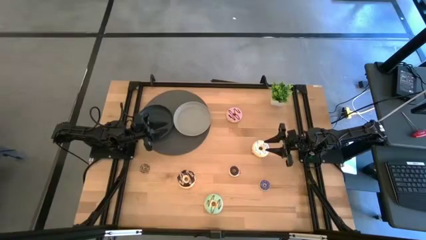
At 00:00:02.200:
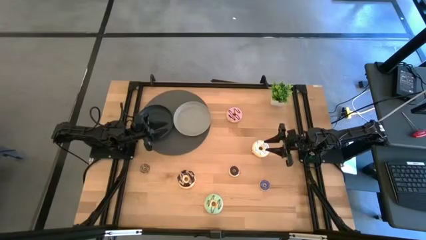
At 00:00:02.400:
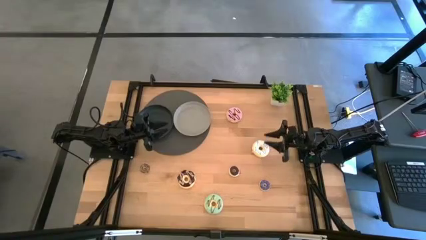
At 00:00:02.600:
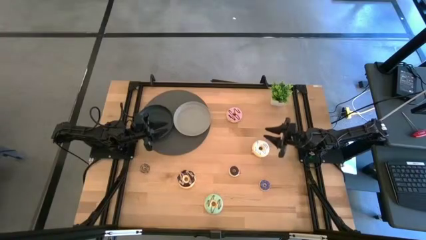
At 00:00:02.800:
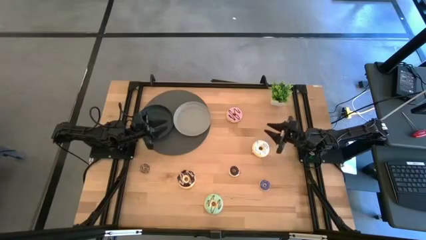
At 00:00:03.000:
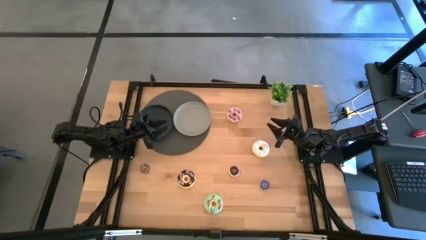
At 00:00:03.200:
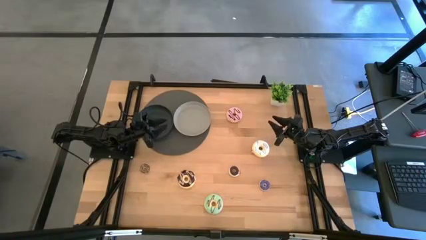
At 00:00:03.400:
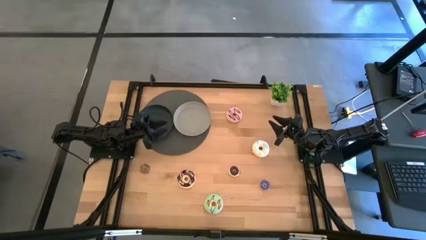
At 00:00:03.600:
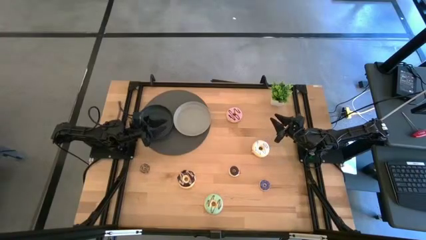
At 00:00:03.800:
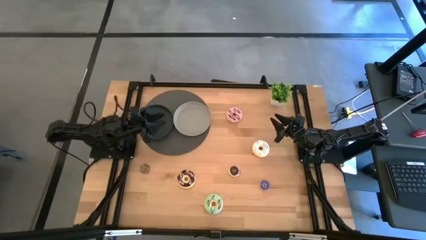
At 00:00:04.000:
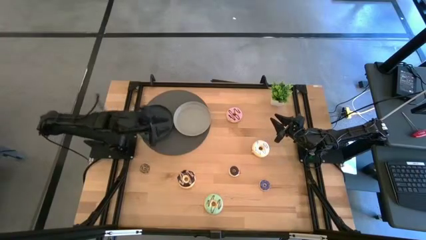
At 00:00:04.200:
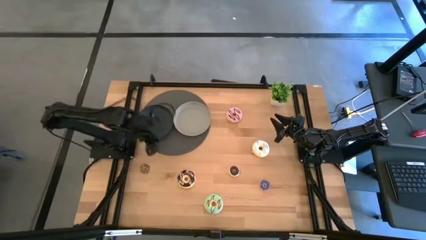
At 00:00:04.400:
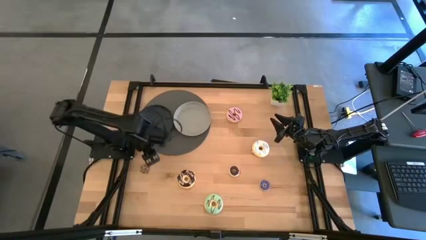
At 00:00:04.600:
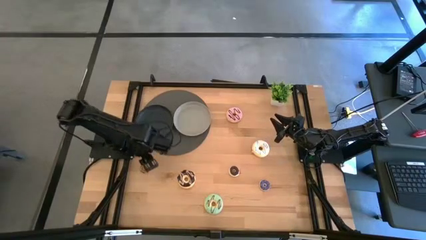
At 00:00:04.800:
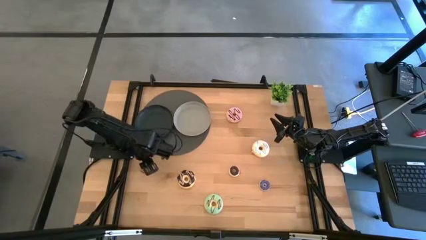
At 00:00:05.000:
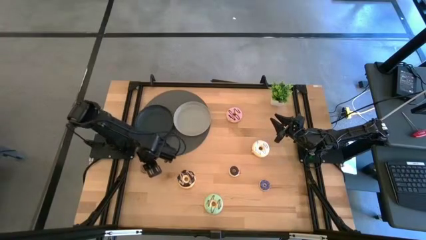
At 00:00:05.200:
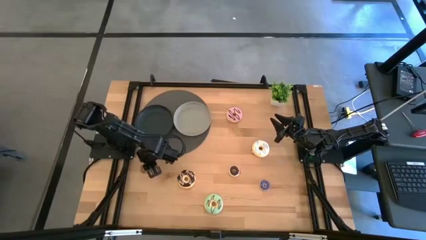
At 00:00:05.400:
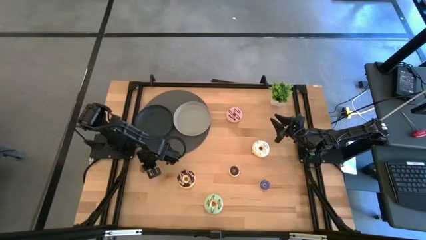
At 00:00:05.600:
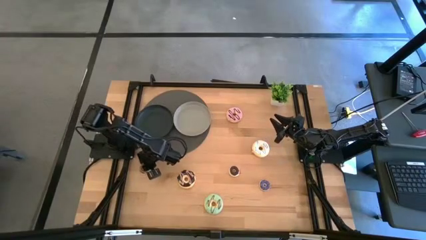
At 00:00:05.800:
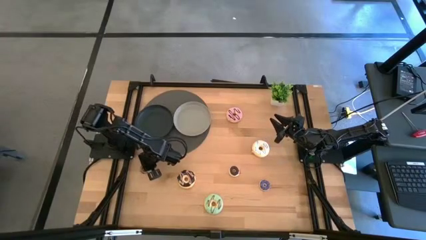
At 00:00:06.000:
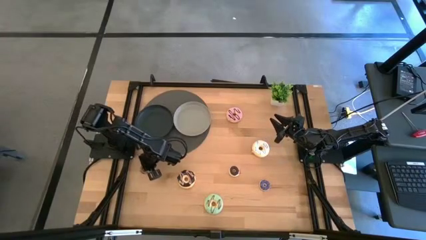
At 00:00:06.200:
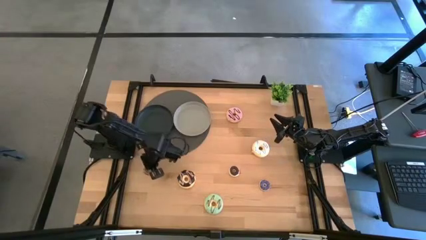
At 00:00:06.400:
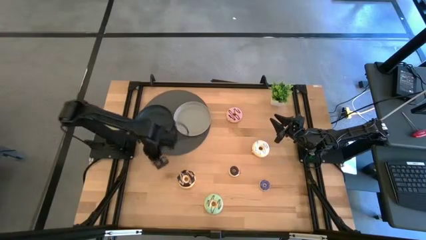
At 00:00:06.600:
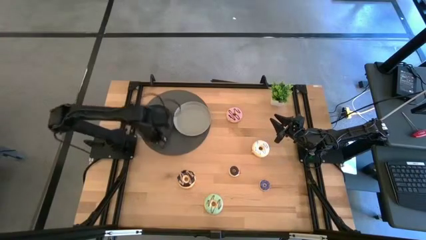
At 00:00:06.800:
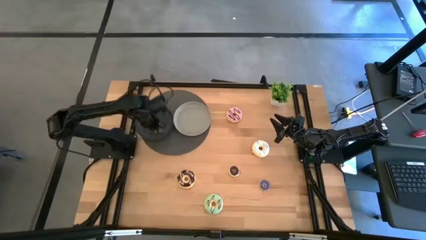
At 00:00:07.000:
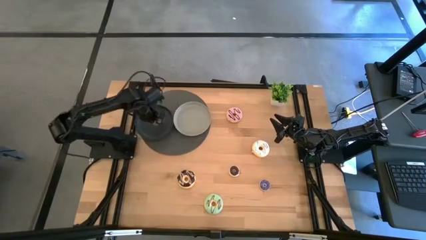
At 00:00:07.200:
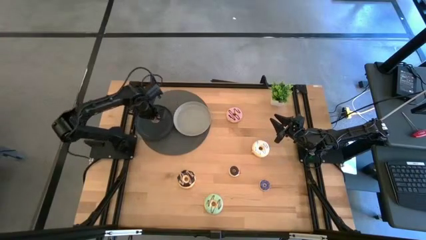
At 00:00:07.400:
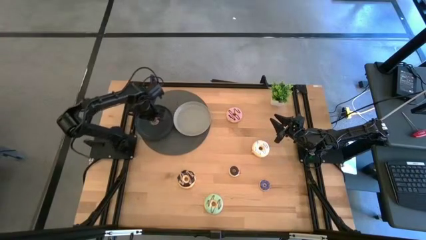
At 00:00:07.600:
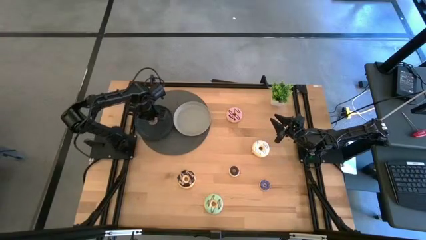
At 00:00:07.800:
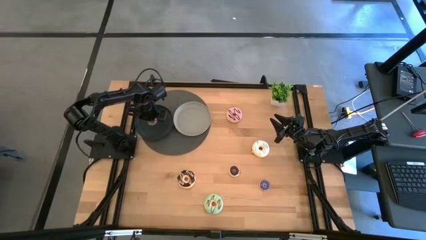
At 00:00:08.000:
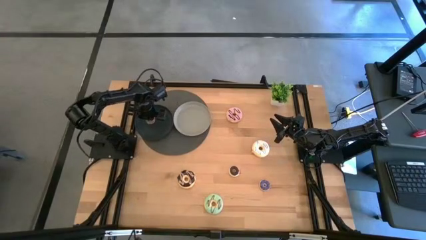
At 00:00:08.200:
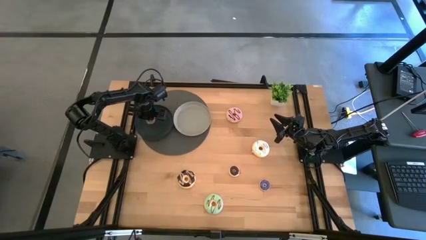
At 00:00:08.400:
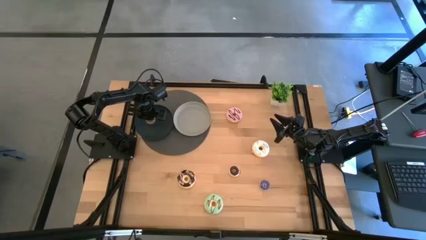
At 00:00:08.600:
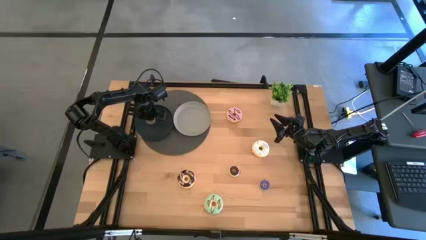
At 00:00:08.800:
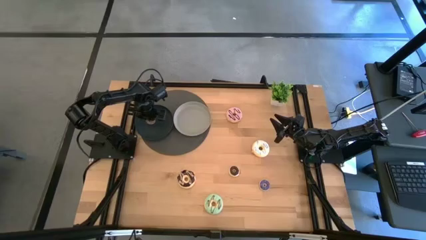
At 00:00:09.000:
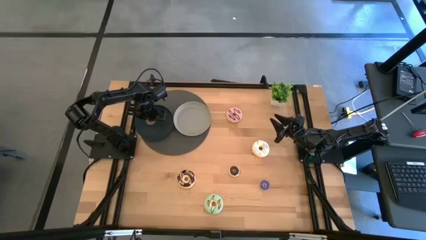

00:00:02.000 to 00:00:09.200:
Task: Pick & Place donuts
Put the small brown donut on the black plate

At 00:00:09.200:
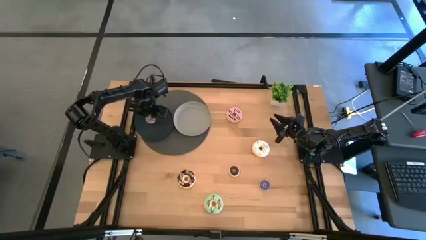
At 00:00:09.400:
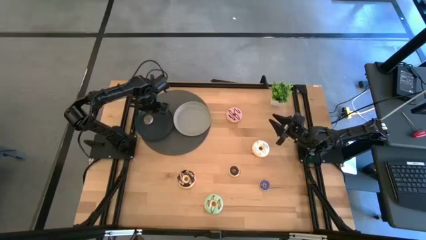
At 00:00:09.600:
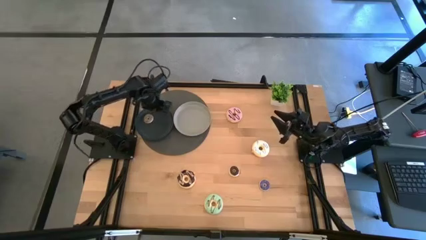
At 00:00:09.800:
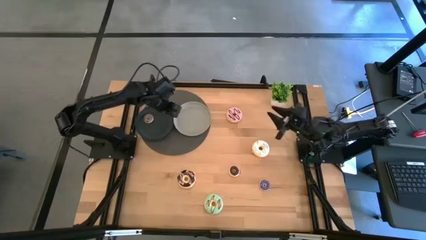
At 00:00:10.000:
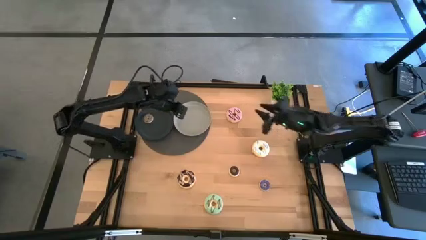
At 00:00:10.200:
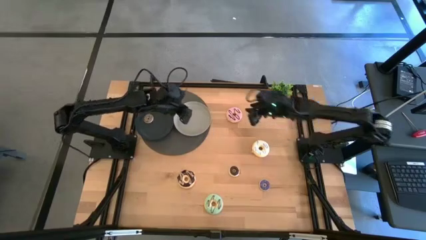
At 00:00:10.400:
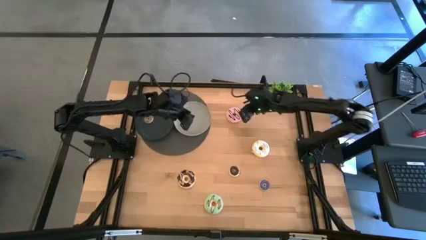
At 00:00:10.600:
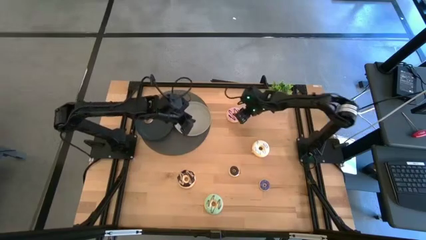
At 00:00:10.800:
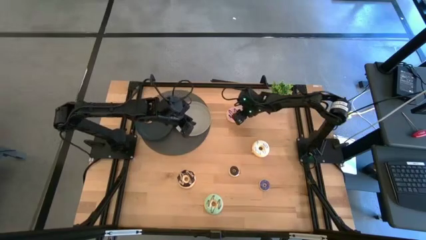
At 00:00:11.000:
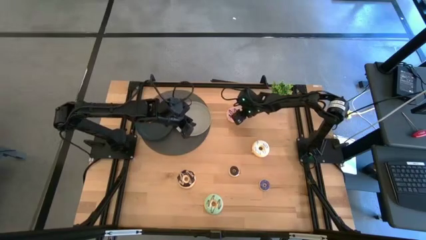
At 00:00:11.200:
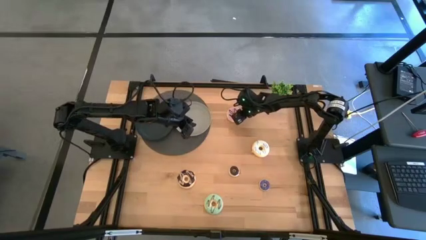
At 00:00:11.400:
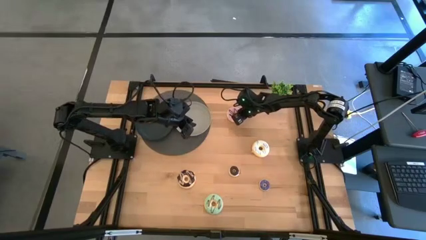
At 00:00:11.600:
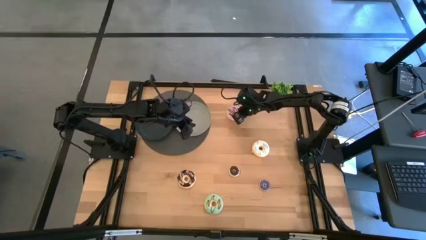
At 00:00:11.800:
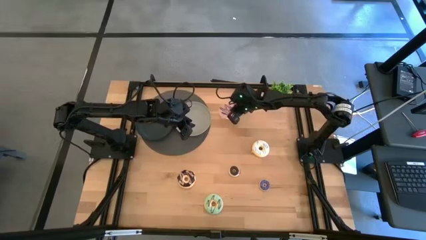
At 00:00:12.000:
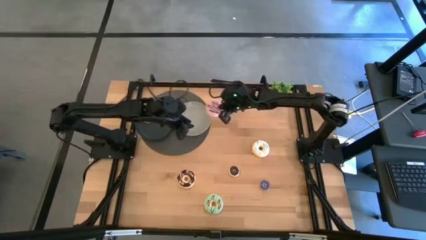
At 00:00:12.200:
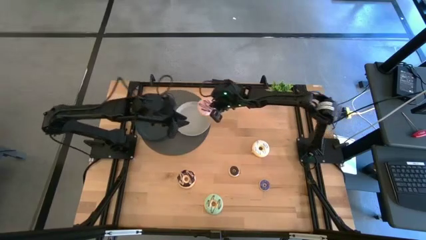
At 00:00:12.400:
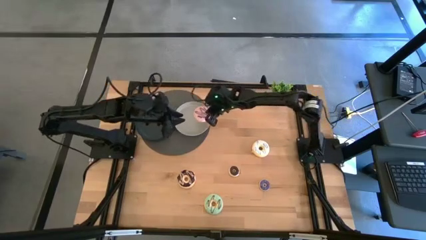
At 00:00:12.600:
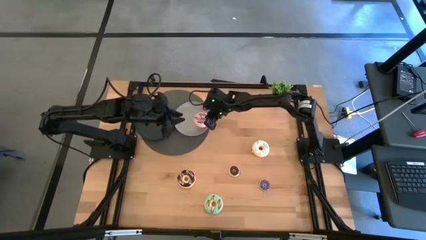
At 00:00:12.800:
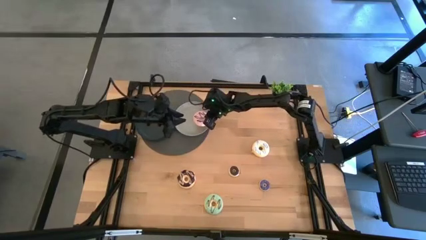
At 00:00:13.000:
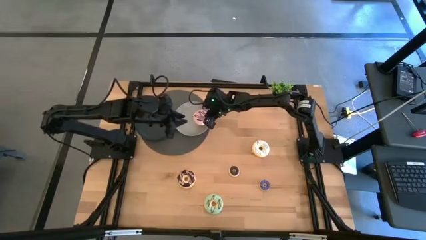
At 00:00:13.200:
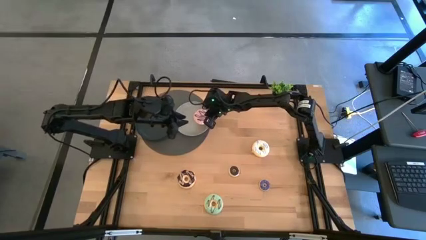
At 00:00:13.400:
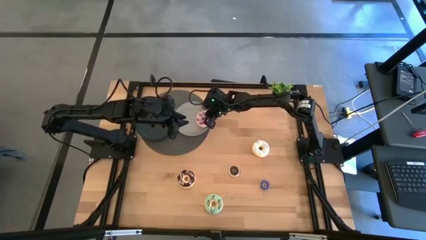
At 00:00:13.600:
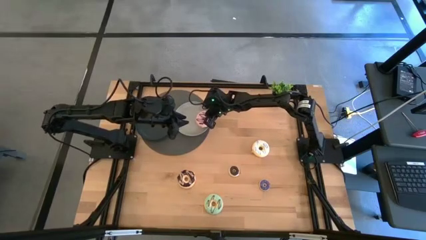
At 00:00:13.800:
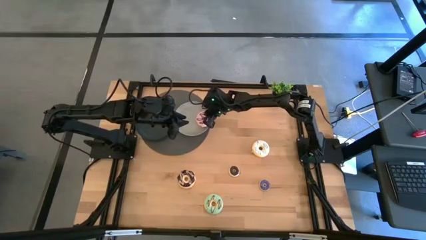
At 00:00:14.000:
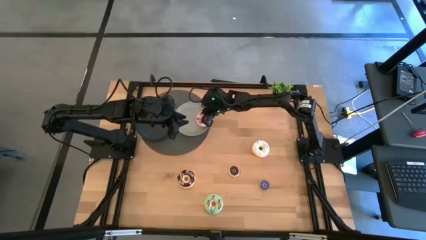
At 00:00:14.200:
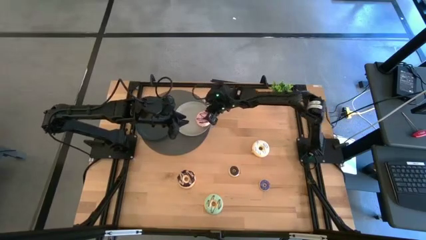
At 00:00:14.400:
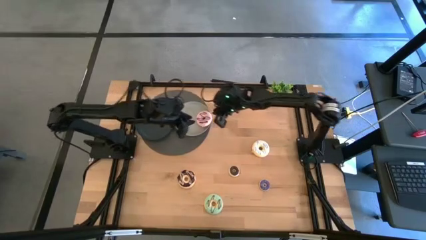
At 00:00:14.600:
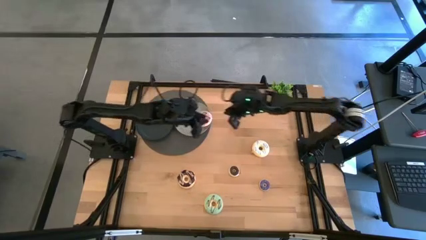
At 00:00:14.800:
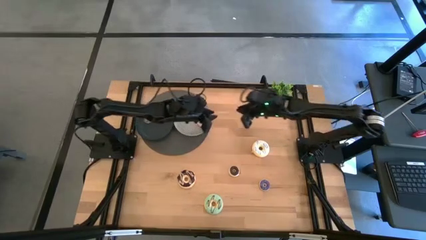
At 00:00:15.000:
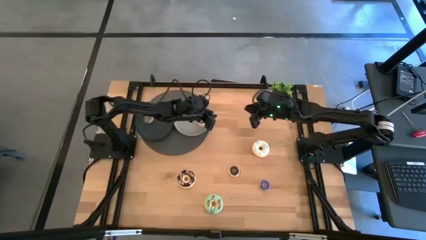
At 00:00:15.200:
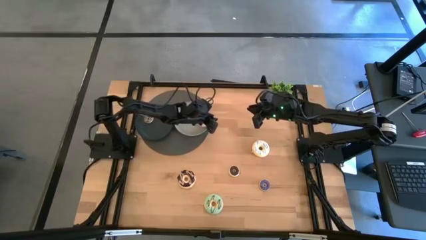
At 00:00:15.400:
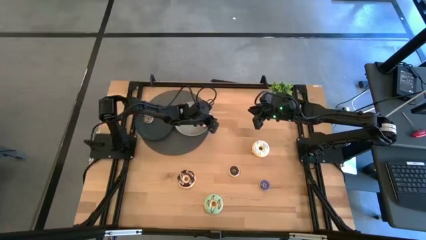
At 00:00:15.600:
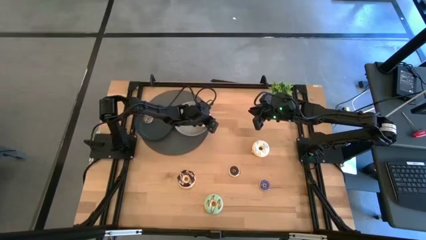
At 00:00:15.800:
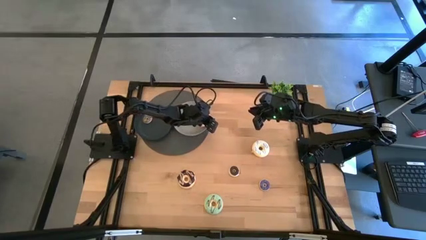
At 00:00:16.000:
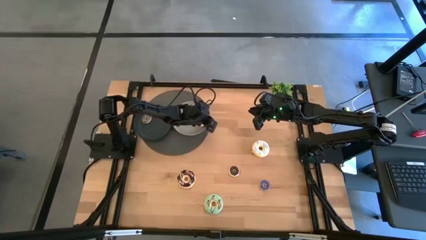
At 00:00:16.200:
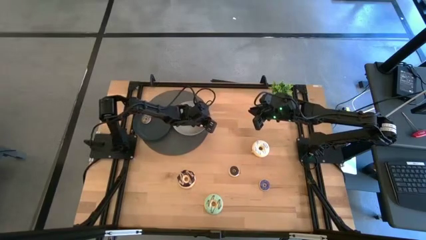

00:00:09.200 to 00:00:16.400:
Put the big purple donut on the gray plate

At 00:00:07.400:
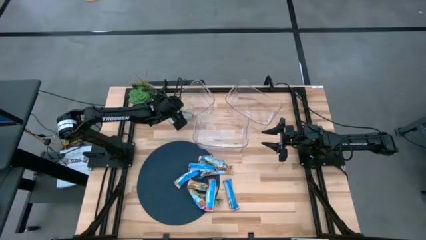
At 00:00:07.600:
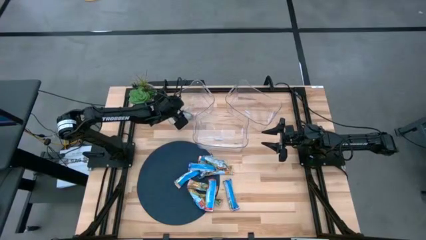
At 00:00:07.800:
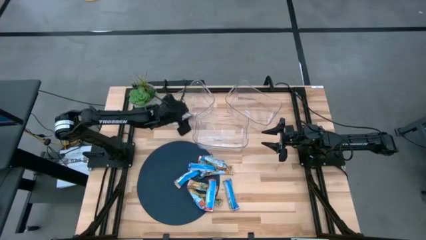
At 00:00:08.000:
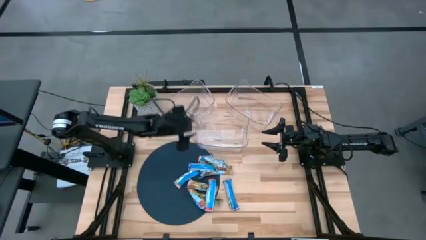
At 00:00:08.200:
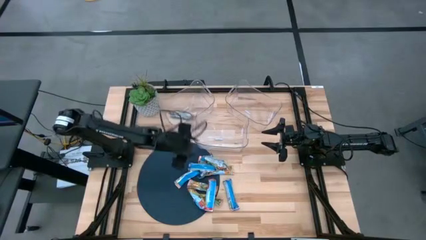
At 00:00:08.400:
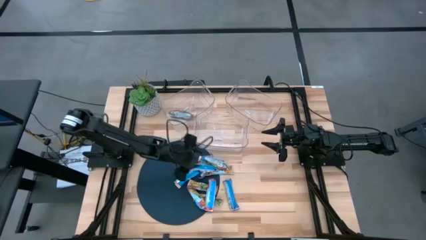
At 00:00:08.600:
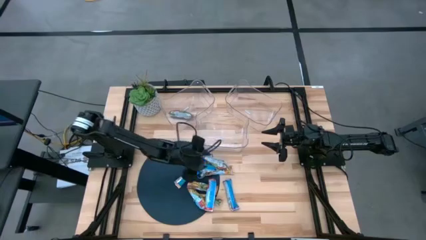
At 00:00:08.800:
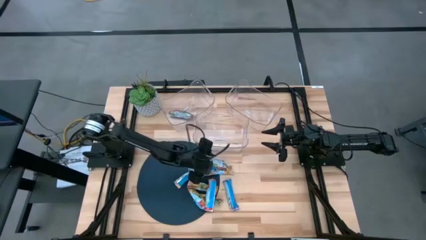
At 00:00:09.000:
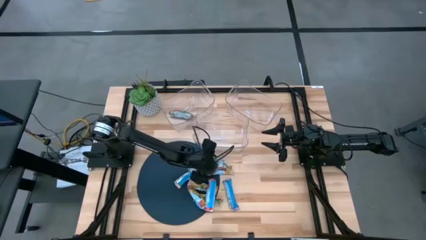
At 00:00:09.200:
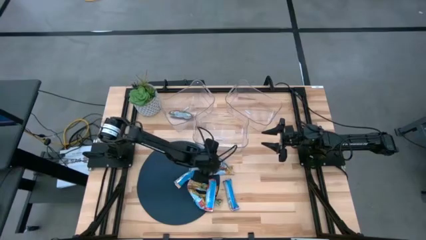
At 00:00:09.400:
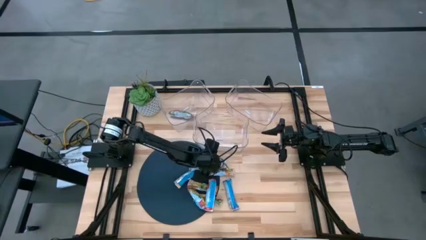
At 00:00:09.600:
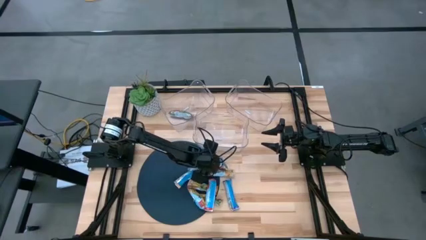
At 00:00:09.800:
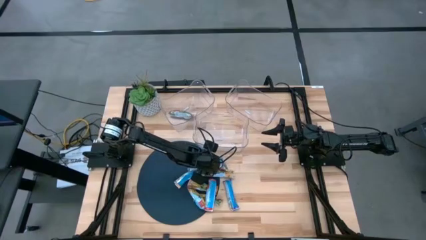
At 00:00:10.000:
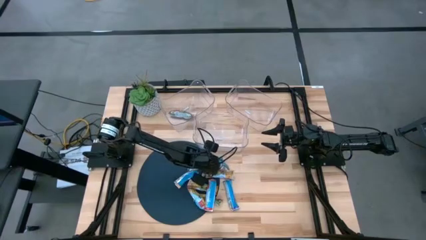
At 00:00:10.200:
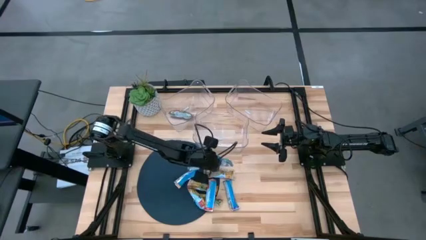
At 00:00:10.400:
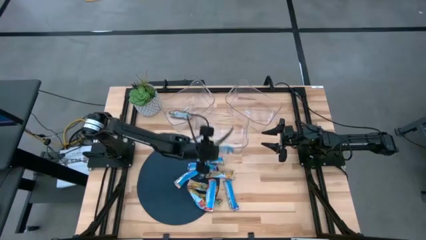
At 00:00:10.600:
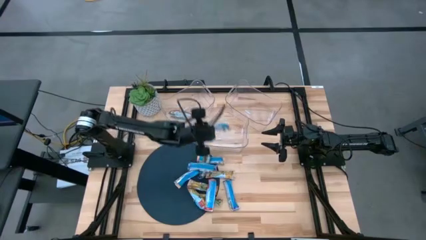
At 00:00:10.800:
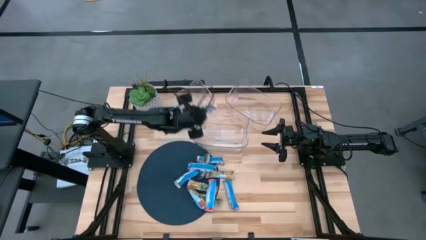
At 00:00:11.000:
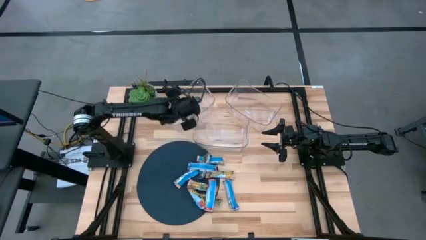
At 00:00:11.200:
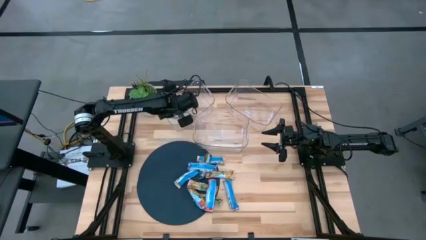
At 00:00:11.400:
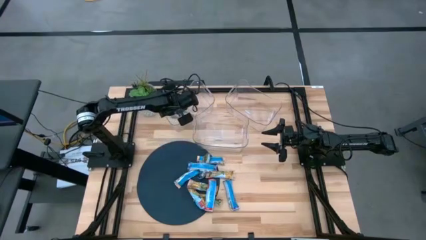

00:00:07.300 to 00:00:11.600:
Task: Pick and place Granola Bars by type
Put the red granola bar into the left transparent bin
